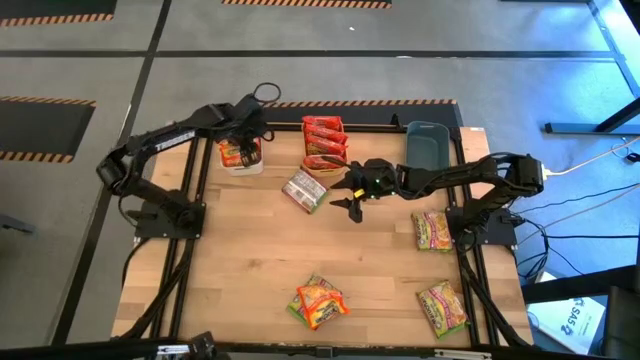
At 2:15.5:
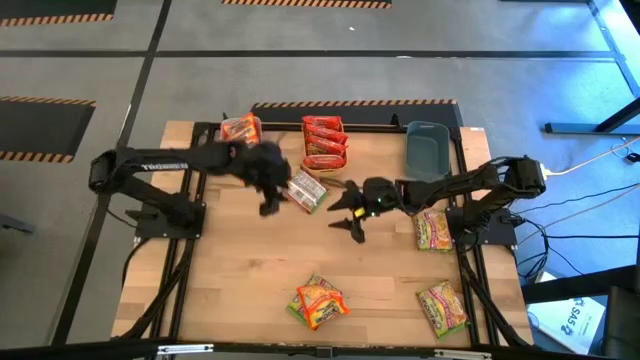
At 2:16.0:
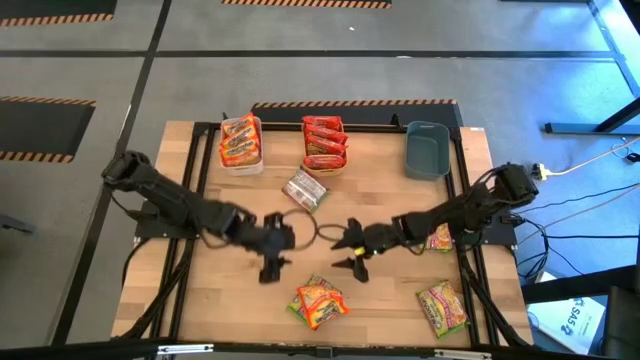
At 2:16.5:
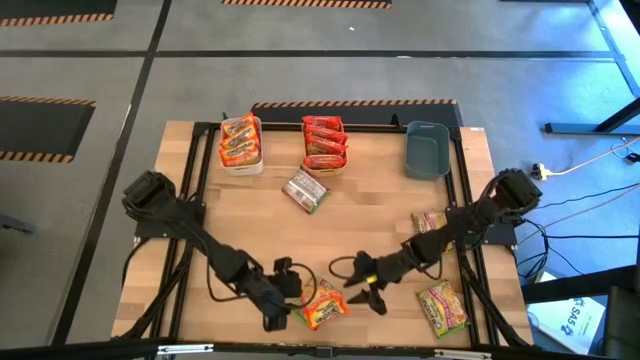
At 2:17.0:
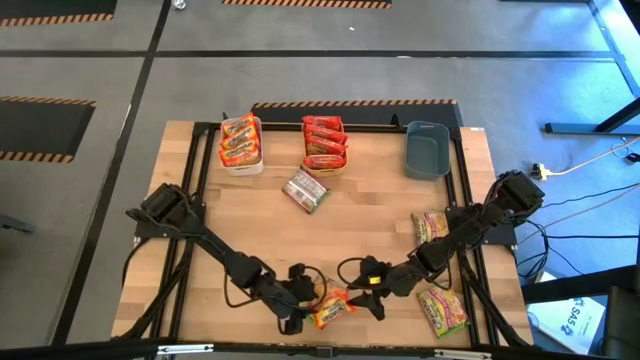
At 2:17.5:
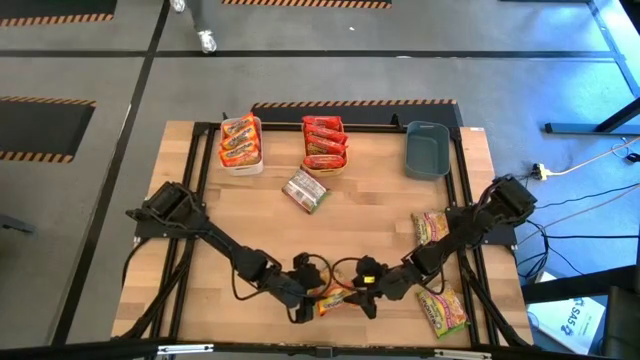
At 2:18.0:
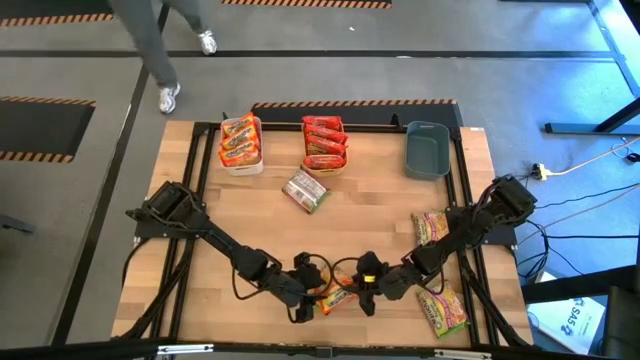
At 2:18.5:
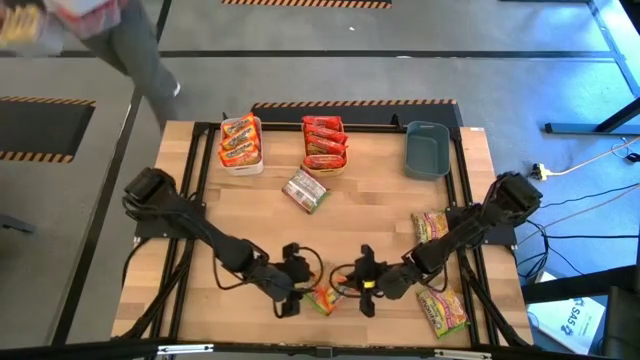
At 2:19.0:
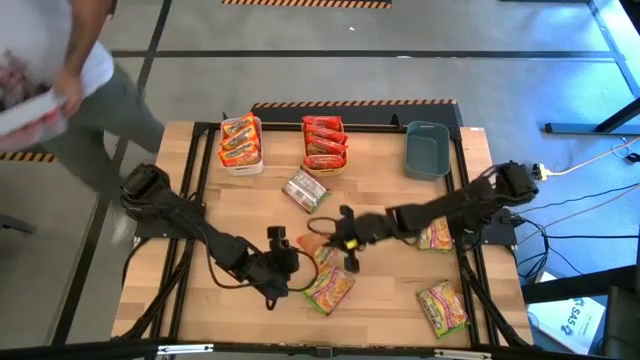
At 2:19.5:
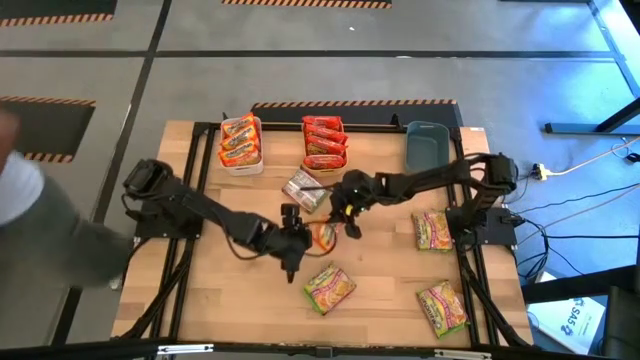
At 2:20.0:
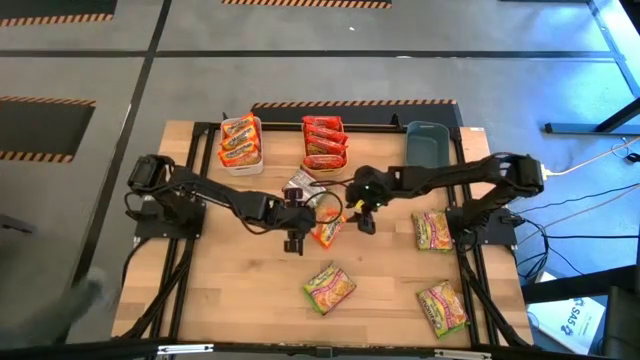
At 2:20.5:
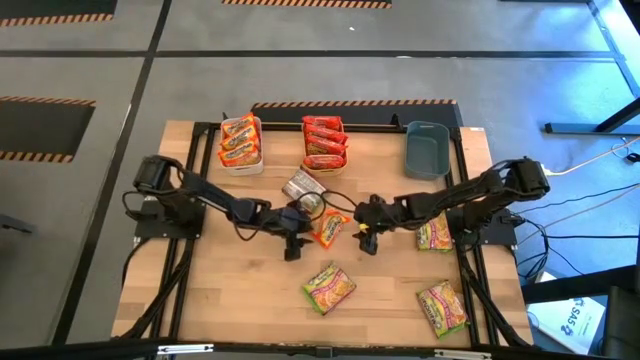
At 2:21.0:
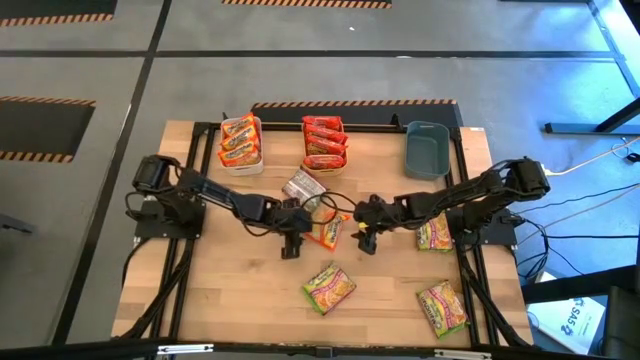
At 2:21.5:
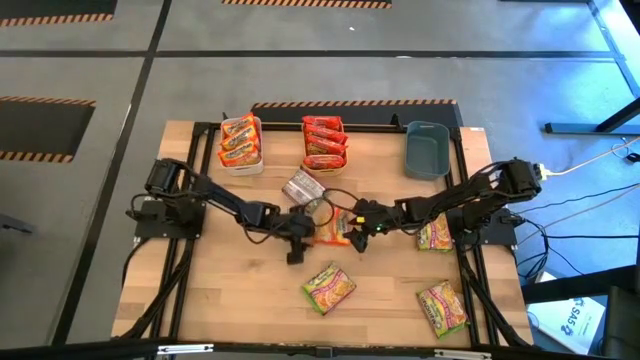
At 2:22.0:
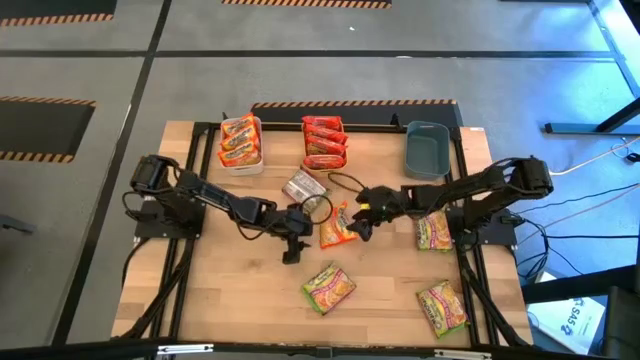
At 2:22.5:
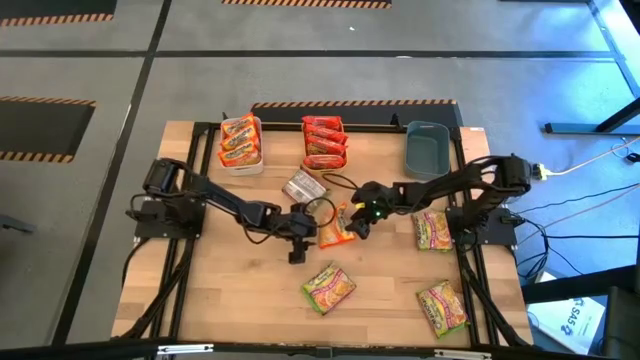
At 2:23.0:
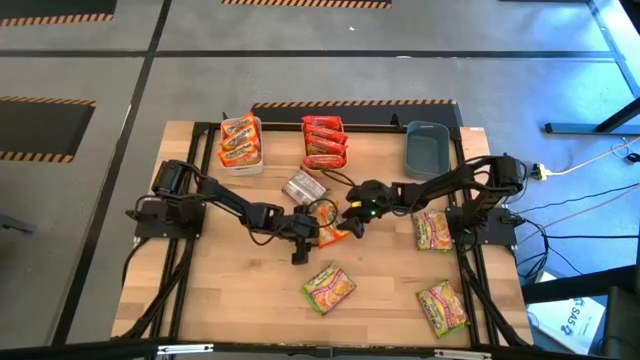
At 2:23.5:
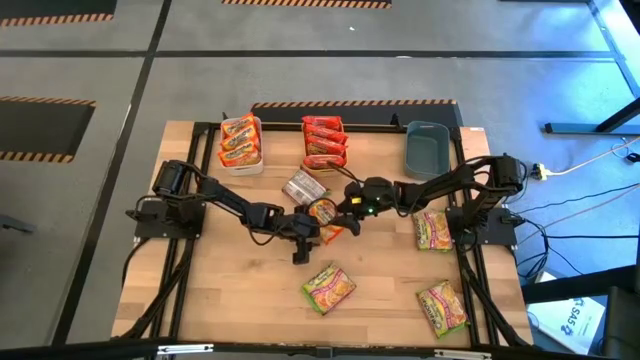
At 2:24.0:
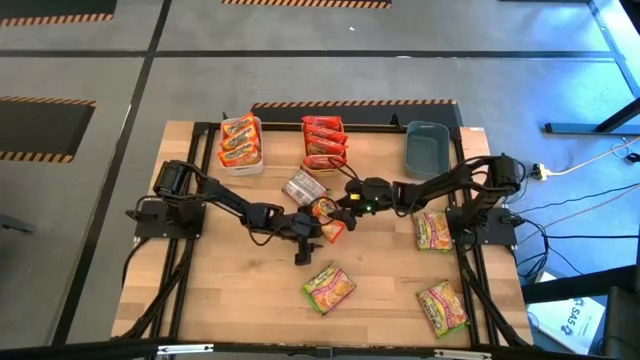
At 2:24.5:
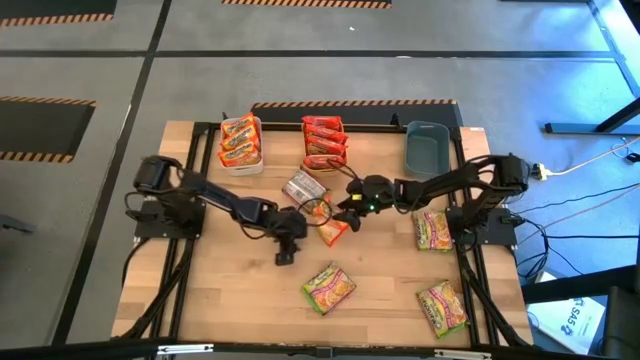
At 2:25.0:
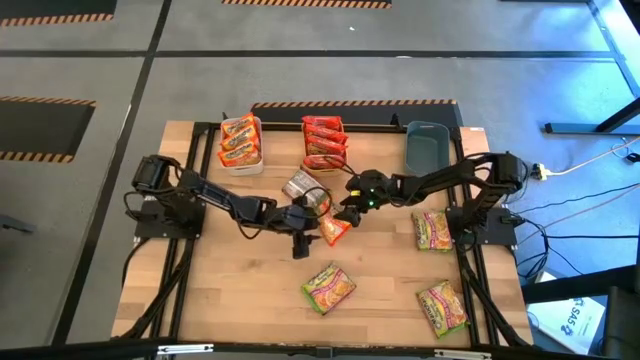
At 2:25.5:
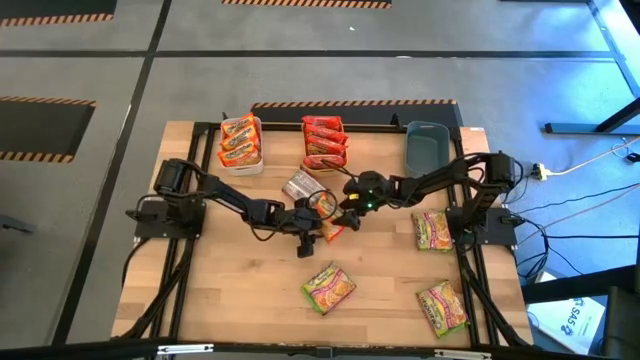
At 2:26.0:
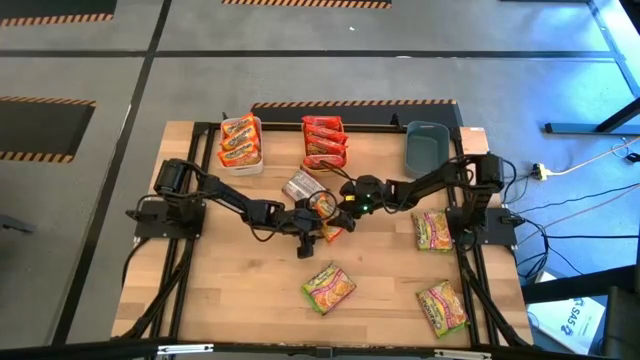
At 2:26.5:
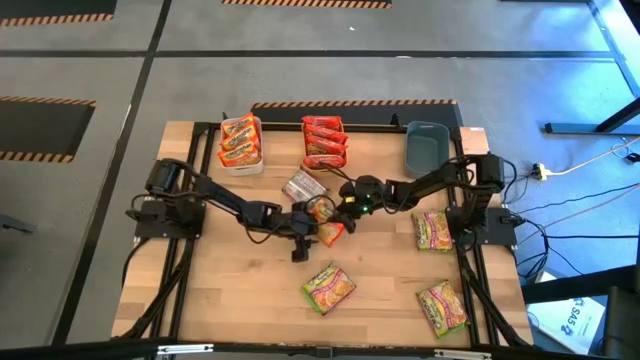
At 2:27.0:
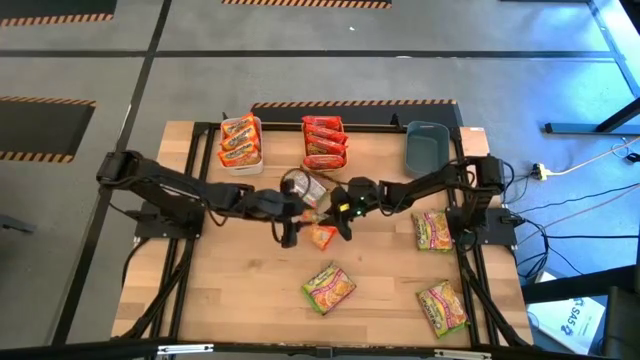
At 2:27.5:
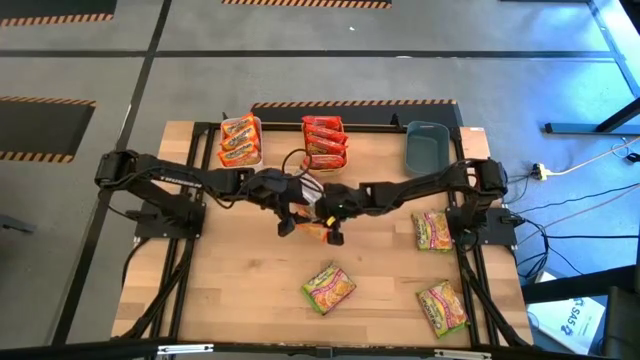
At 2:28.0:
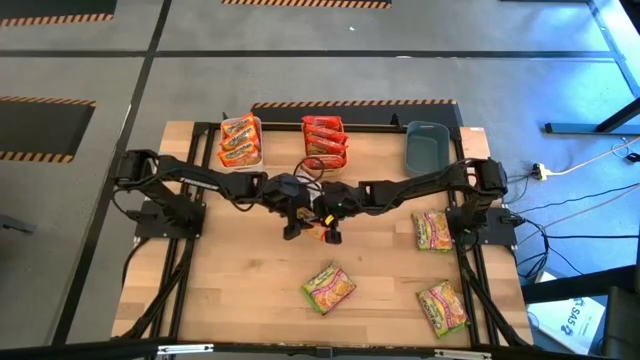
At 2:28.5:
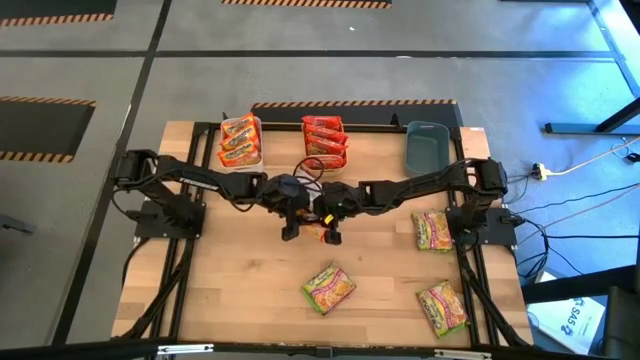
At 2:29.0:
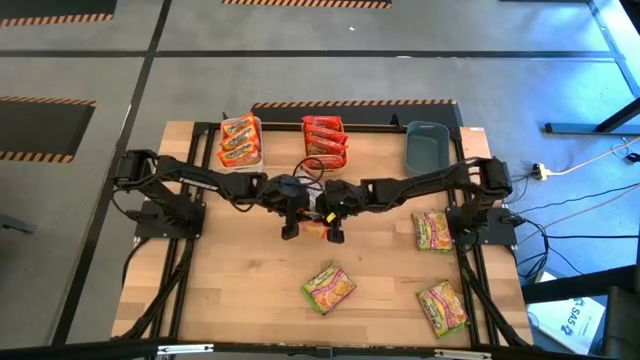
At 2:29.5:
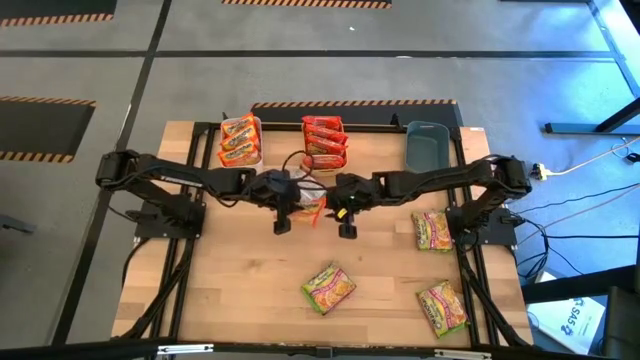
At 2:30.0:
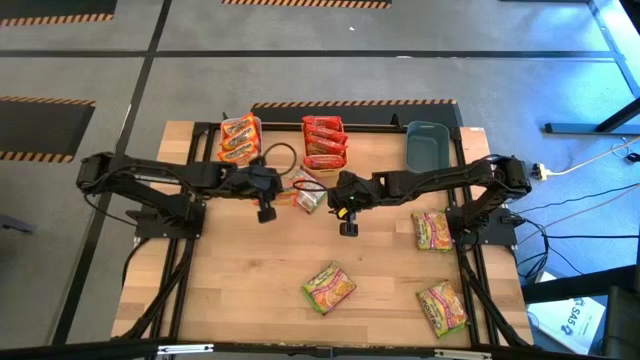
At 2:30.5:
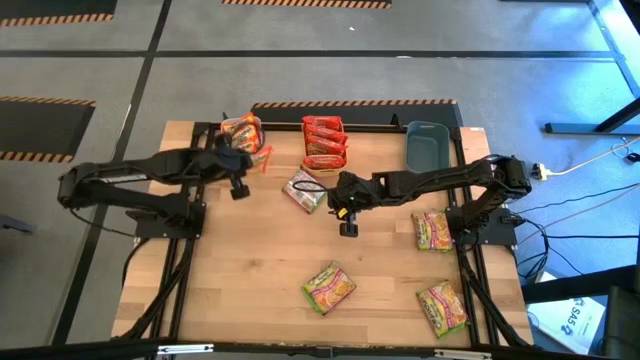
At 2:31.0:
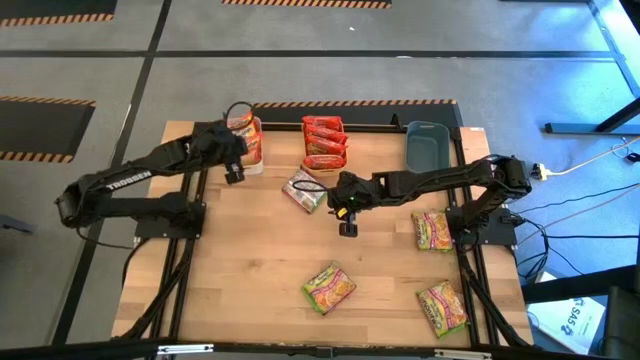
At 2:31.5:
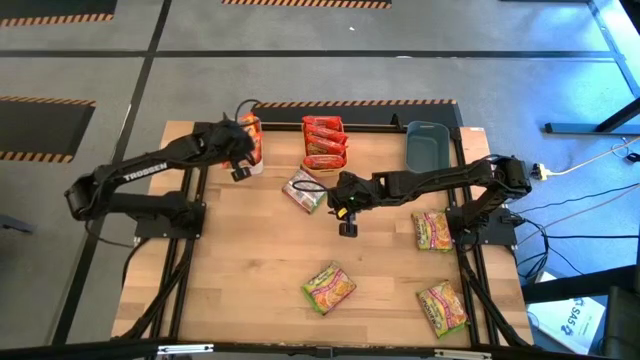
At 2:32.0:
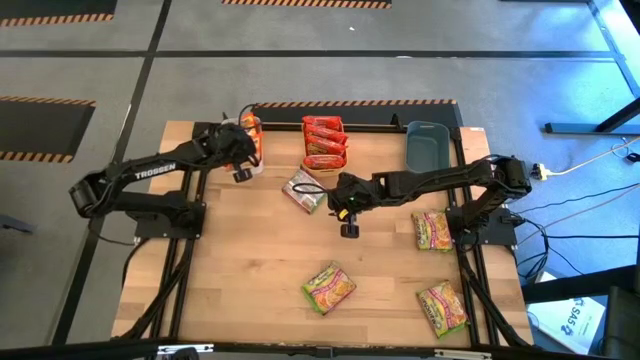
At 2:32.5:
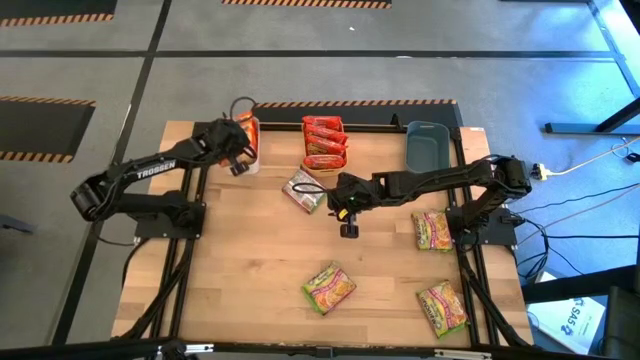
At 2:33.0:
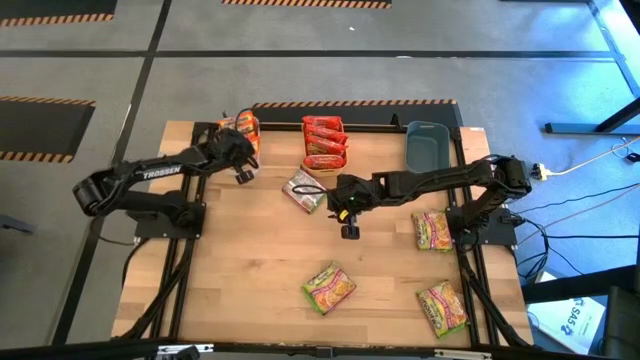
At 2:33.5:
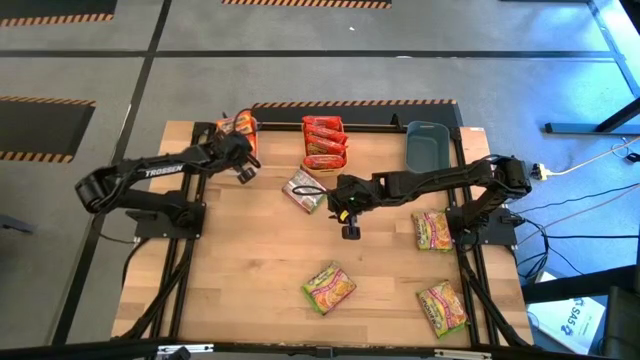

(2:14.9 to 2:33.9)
Task: Sort Maruchan noodles
Put the light orange noddle pack into the white bin

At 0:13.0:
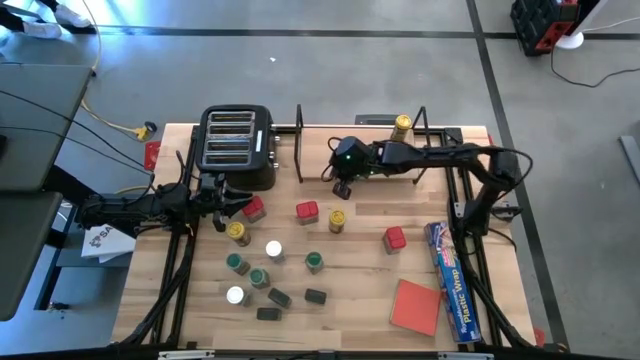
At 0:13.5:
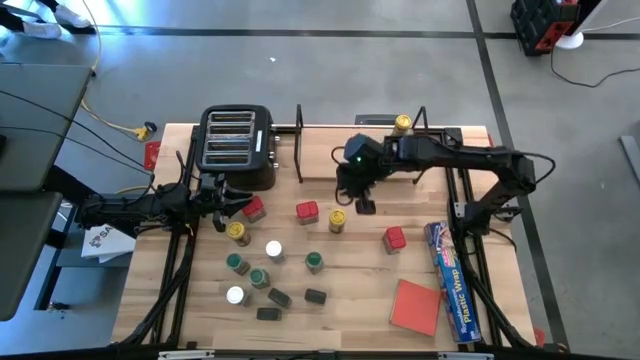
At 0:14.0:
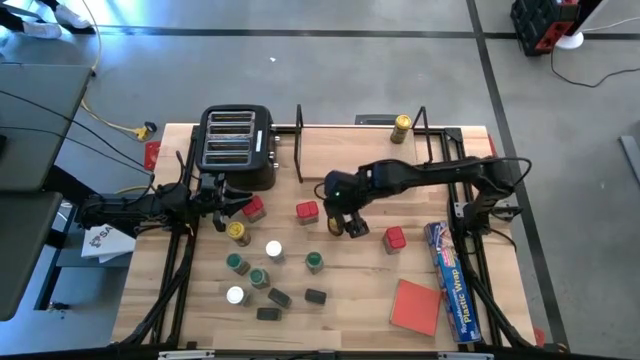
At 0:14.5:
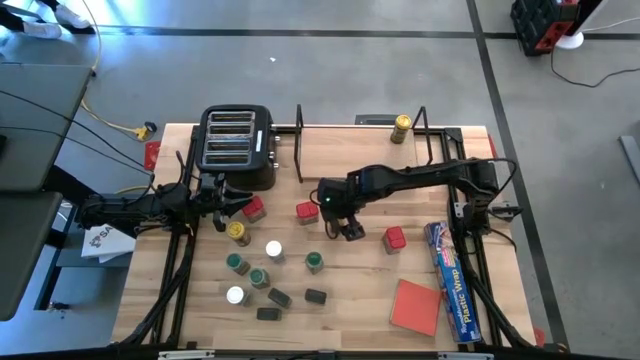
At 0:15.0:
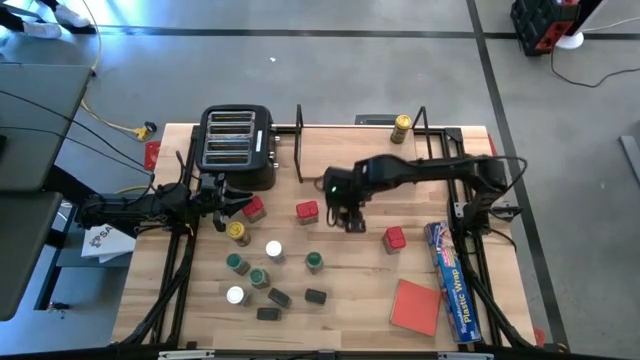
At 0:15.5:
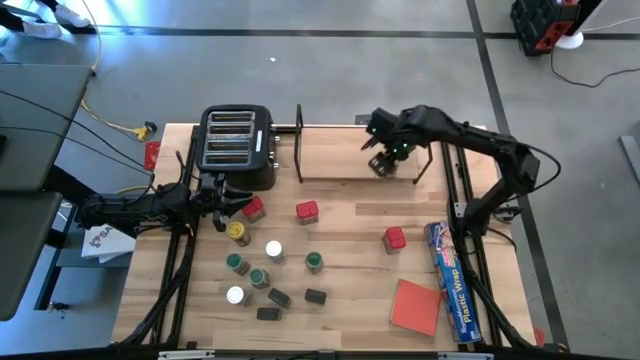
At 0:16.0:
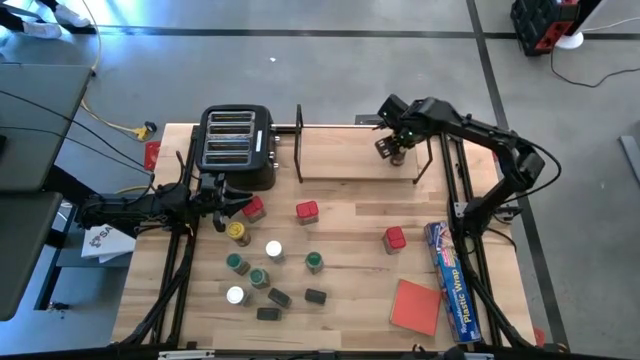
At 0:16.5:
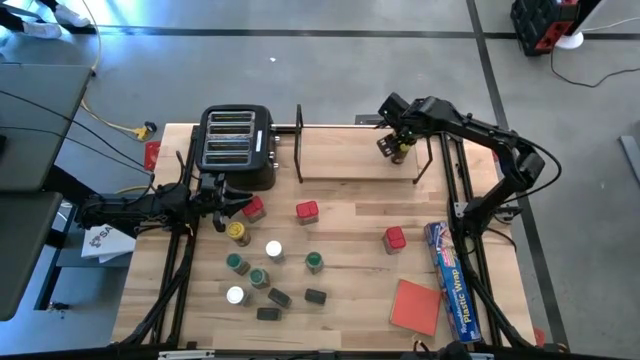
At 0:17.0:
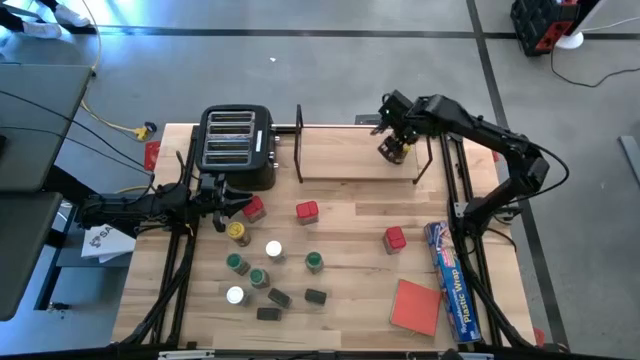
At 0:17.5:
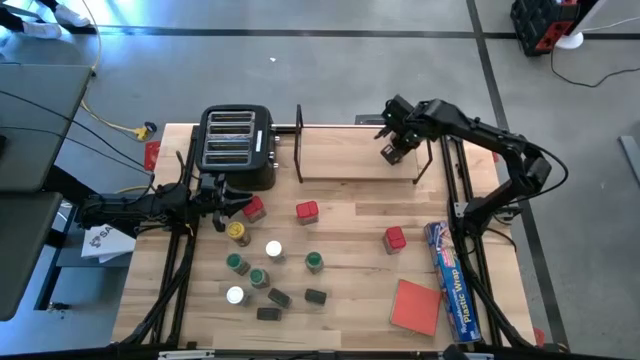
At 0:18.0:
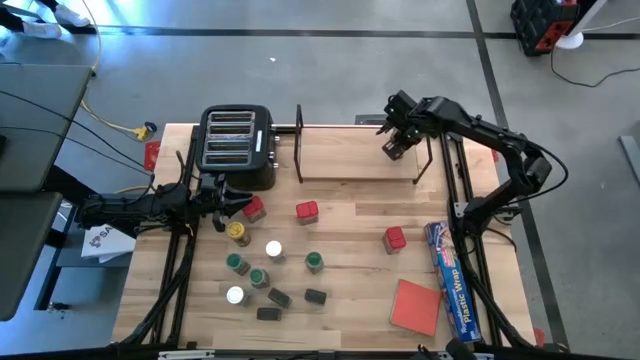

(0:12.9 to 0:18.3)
Task: Shelf spices
Put the right yellow seasoning bottle on the shelf aligned with the other yellow seasoning bottle
